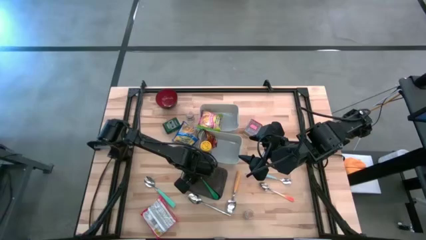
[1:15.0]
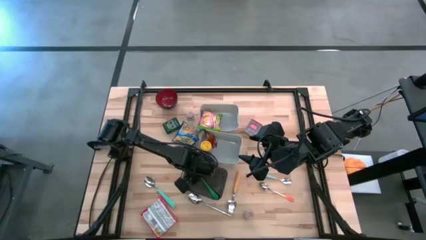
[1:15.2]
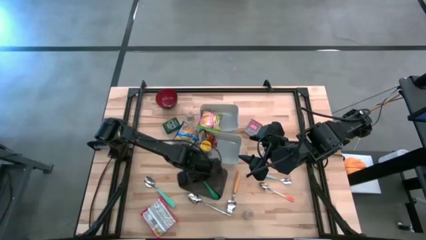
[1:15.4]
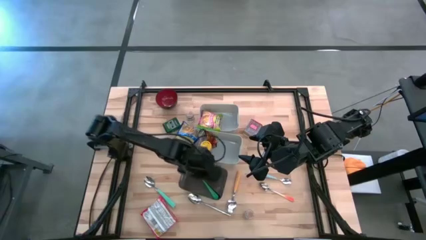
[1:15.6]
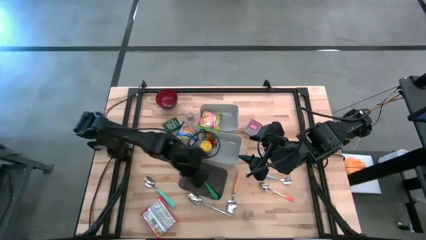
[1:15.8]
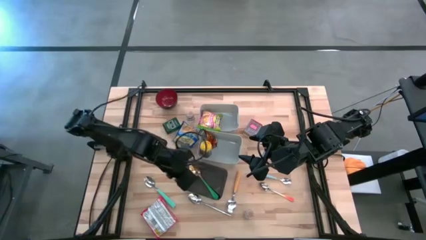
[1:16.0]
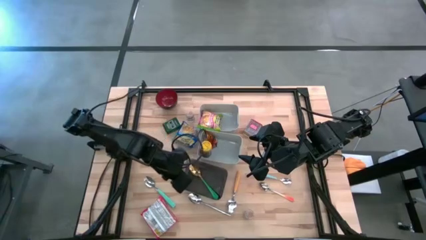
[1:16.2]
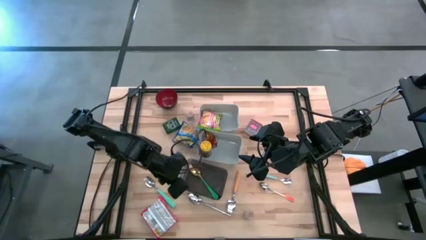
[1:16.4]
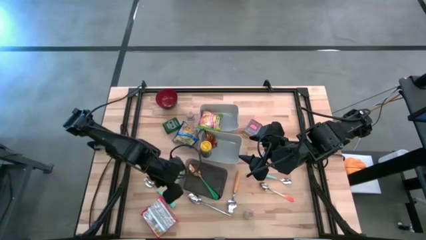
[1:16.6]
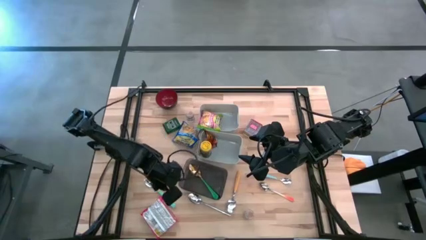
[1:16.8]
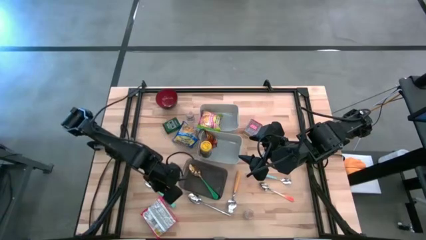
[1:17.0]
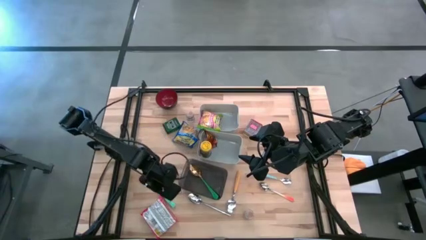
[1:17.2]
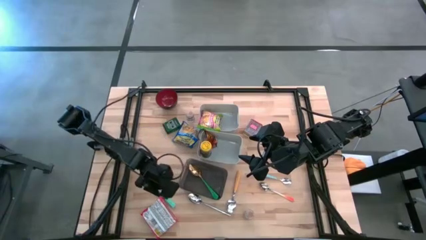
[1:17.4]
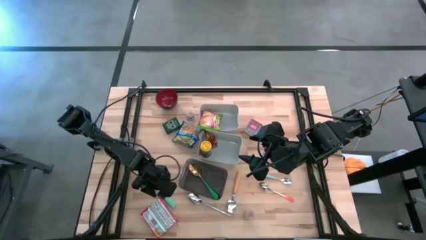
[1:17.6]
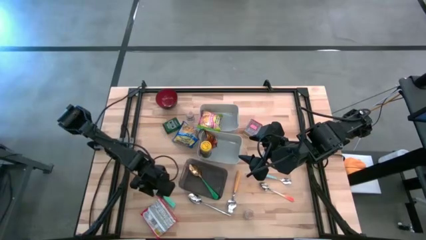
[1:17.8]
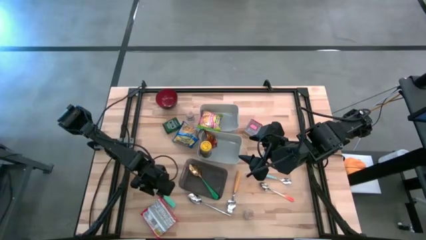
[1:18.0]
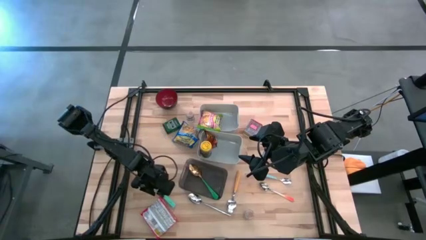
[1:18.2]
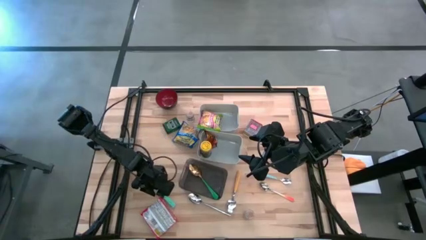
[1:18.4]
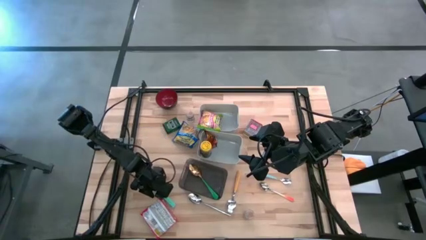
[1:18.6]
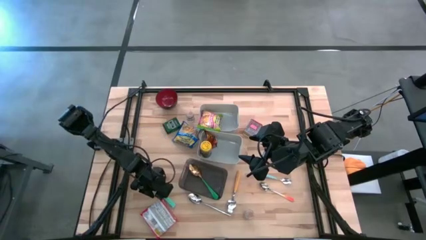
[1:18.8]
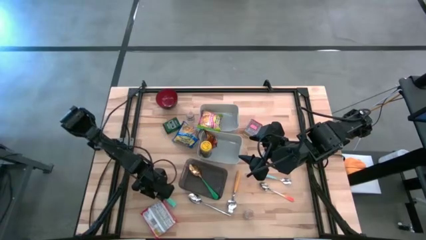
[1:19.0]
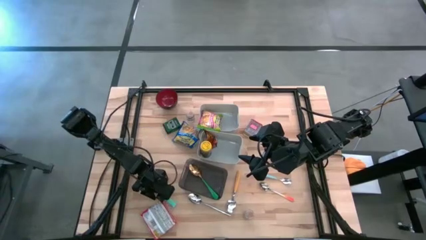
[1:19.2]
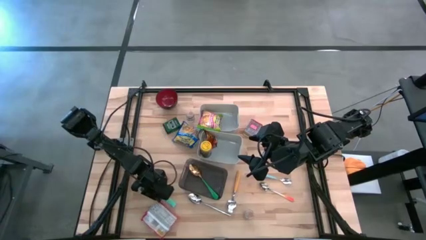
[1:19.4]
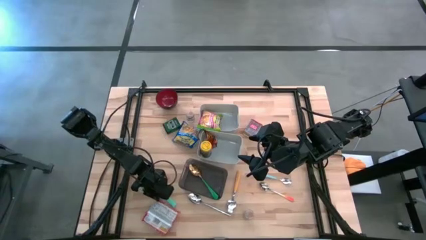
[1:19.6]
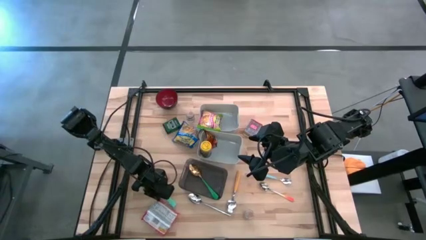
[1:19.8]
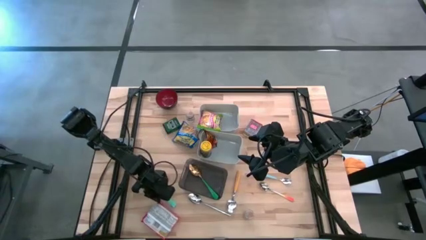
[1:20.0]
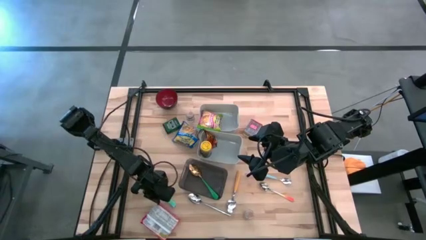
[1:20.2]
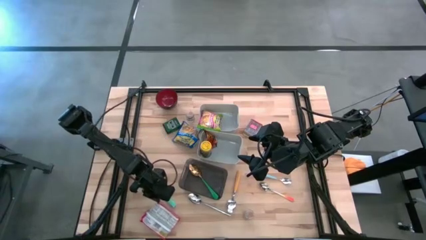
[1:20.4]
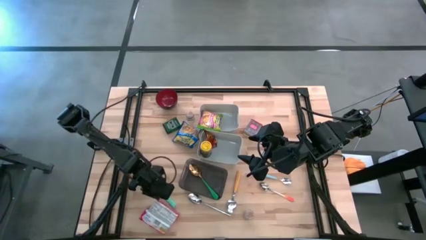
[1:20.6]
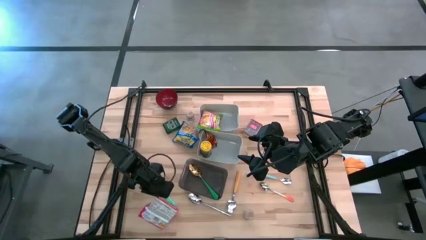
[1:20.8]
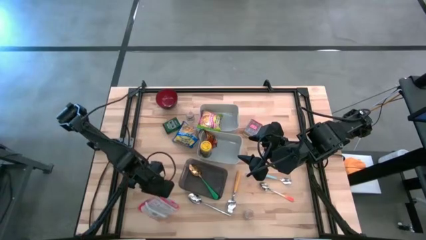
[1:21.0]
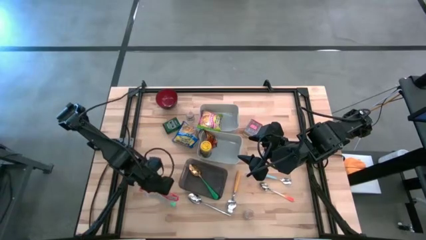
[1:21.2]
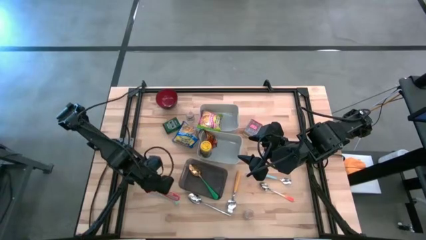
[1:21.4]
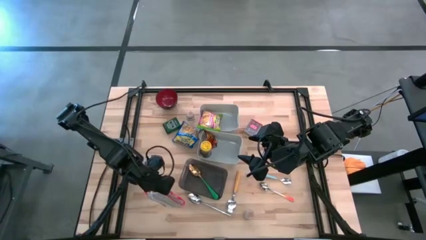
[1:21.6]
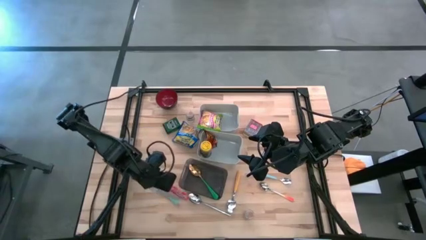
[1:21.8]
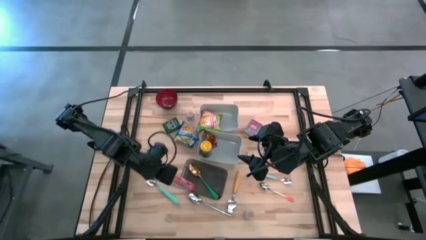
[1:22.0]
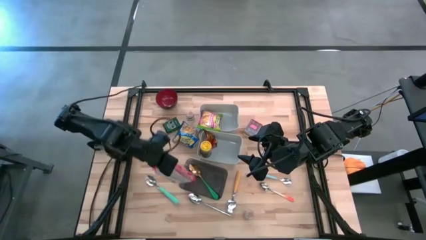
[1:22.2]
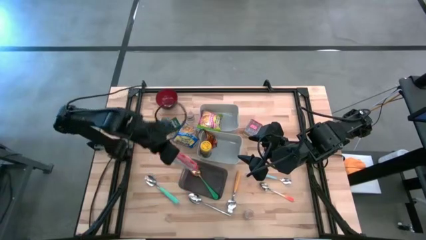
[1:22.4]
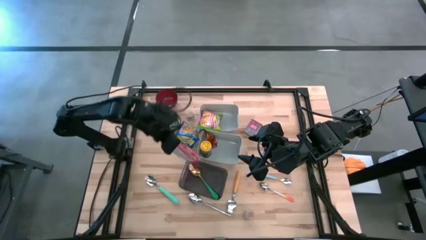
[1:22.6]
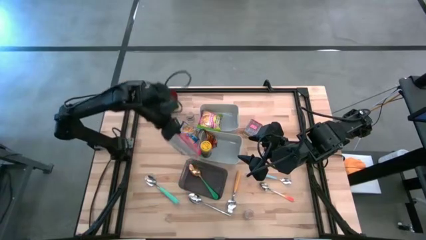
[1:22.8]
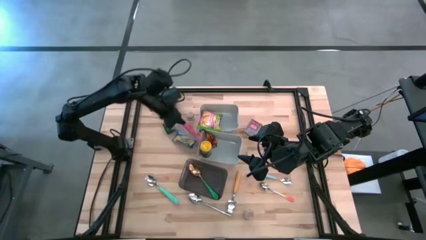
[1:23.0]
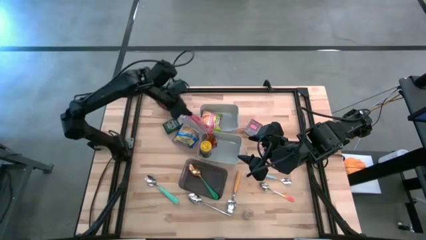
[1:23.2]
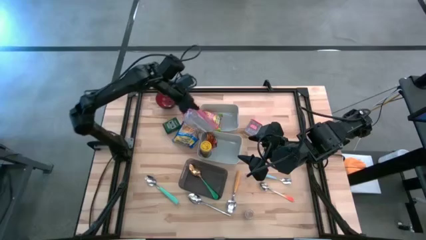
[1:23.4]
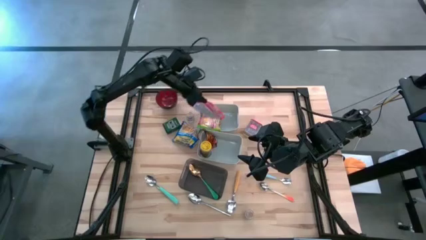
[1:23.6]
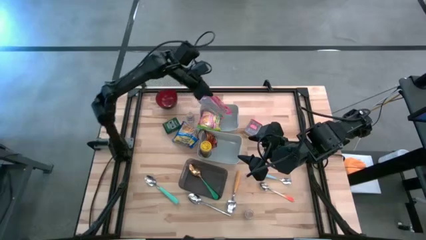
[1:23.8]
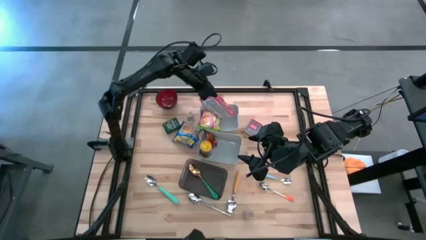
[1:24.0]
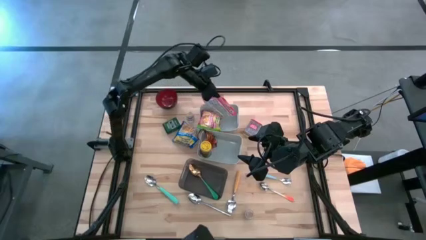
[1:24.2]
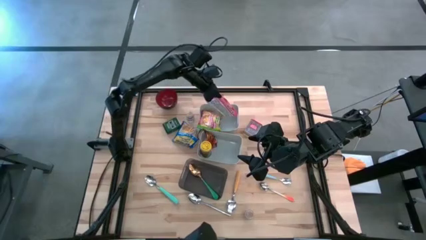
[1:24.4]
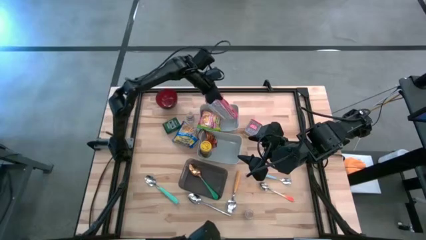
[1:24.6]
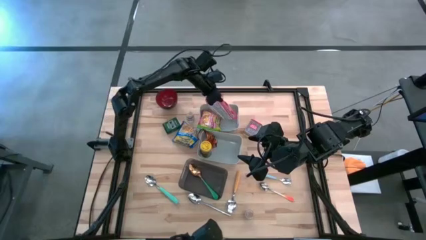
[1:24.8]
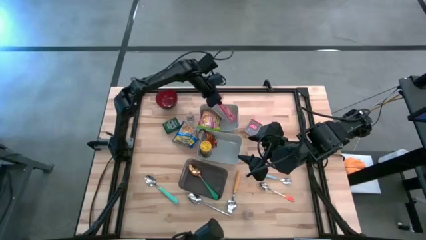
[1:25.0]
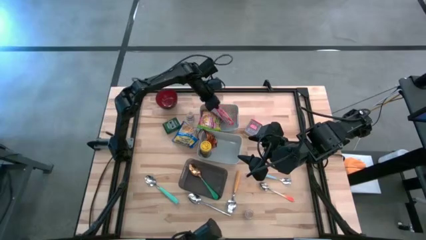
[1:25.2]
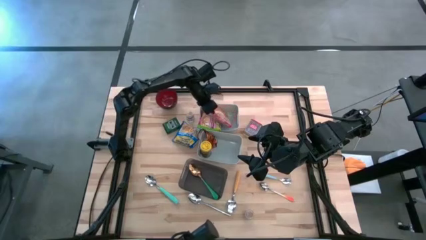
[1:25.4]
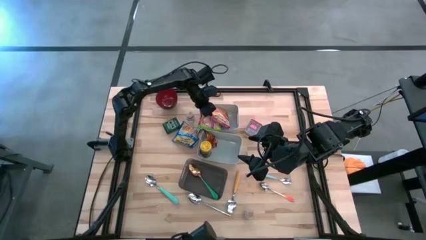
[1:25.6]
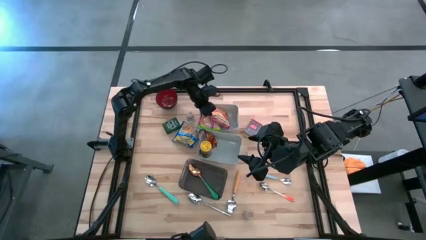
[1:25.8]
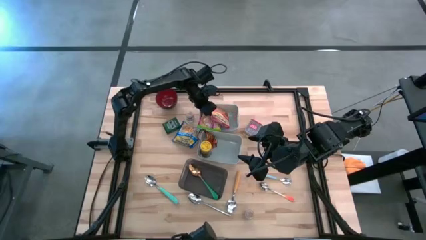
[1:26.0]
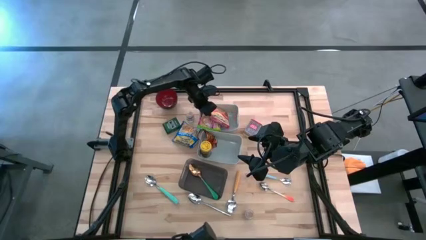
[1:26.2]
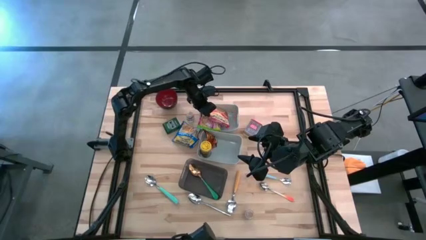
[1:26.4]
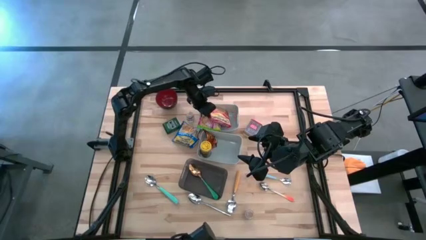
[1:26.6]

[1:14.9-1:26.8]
Put the red noodle pack into the top gray bin
